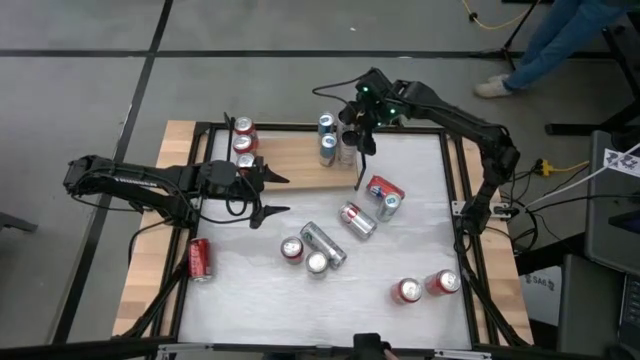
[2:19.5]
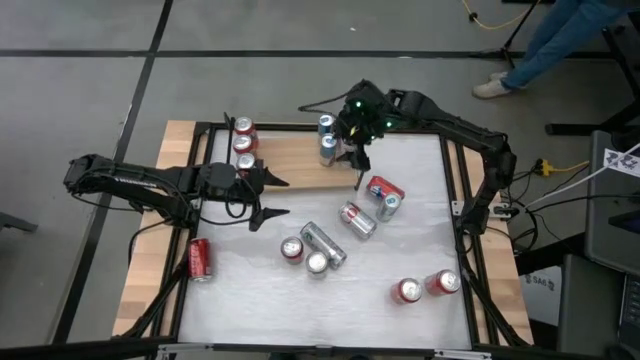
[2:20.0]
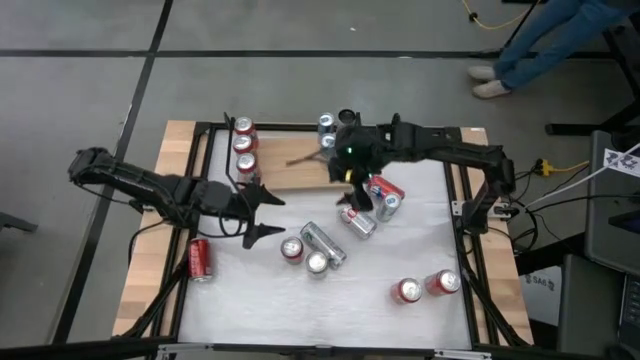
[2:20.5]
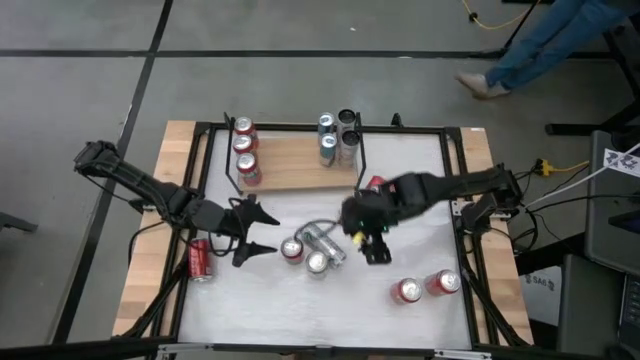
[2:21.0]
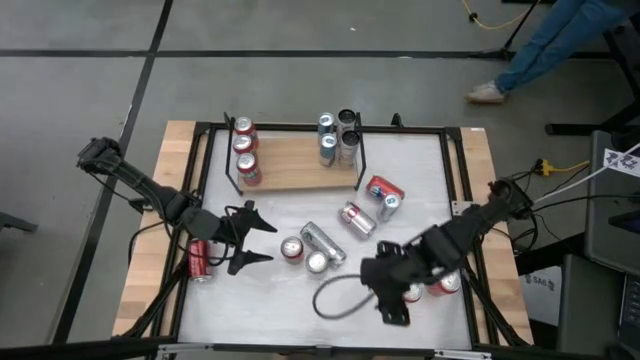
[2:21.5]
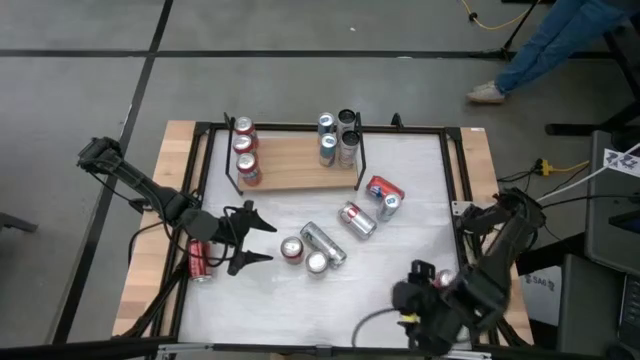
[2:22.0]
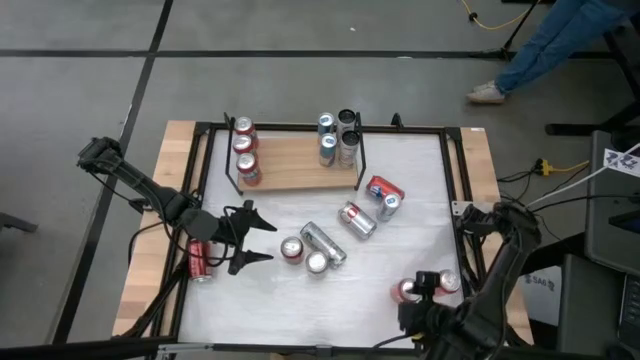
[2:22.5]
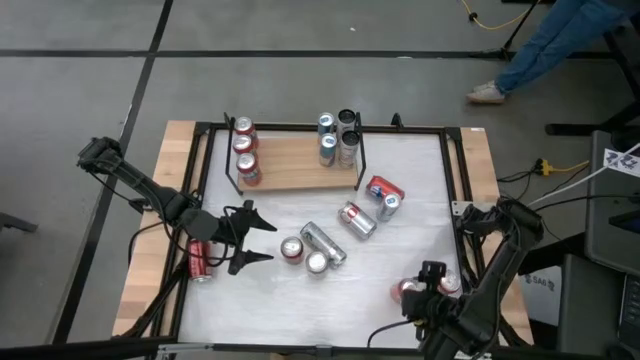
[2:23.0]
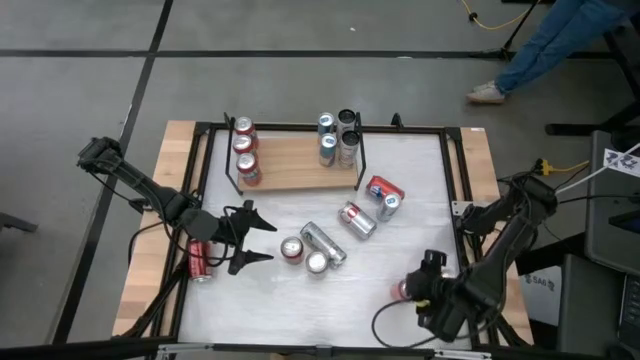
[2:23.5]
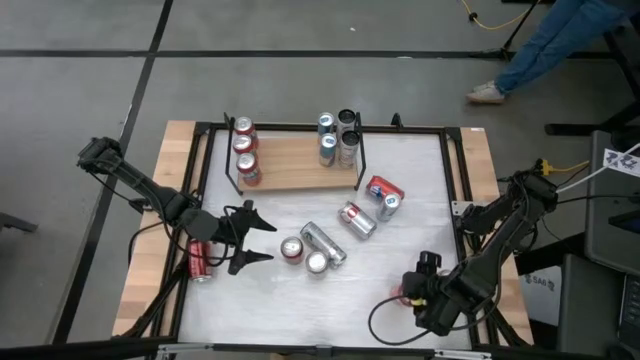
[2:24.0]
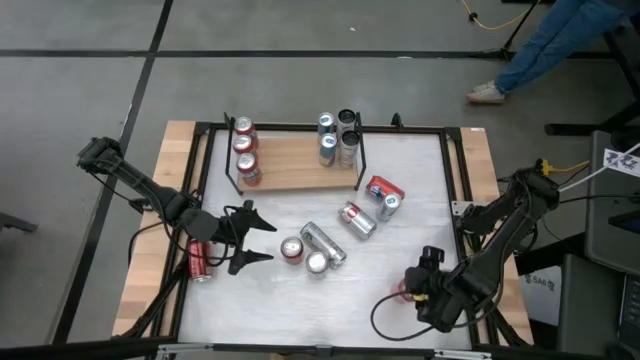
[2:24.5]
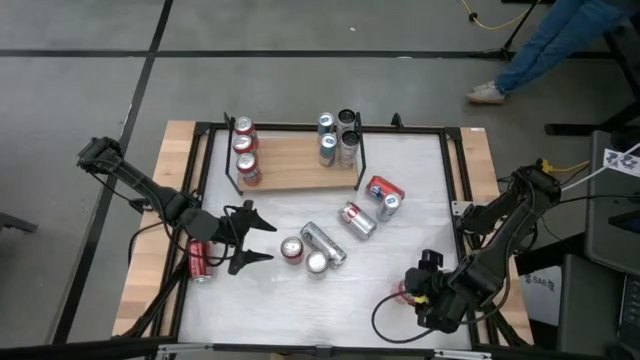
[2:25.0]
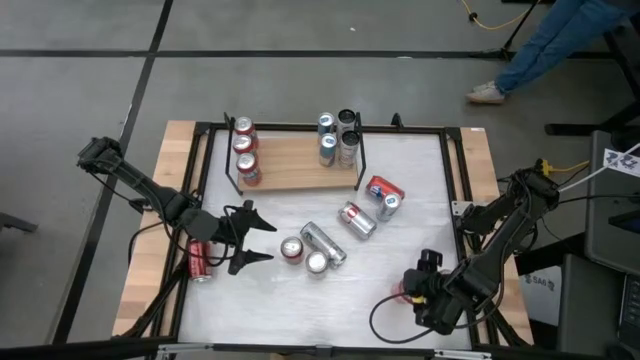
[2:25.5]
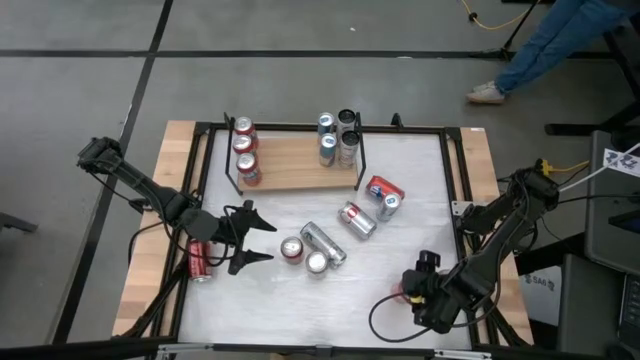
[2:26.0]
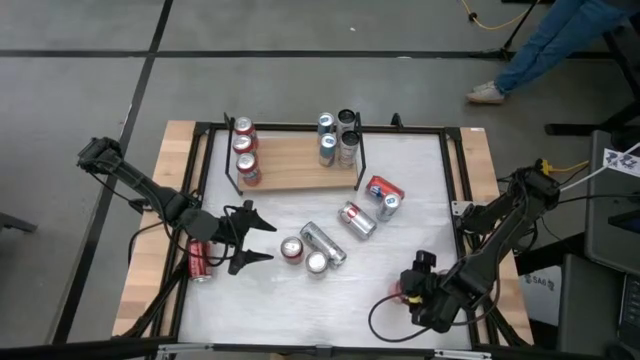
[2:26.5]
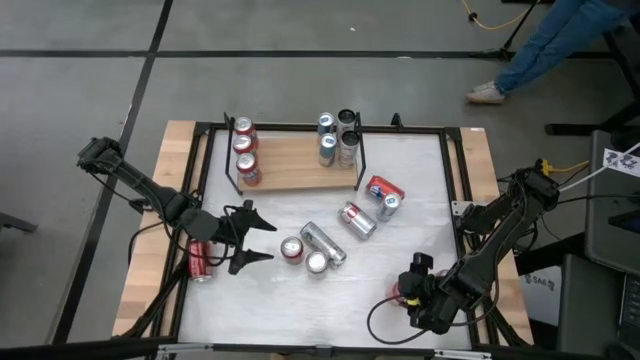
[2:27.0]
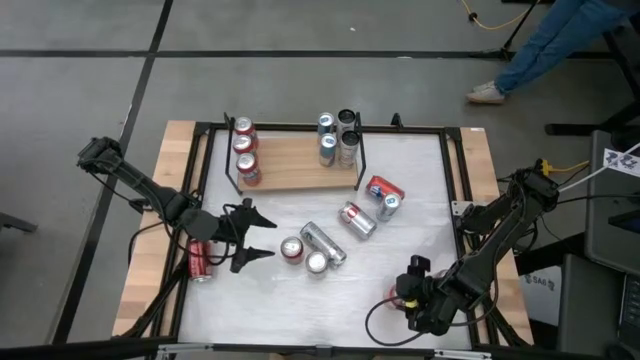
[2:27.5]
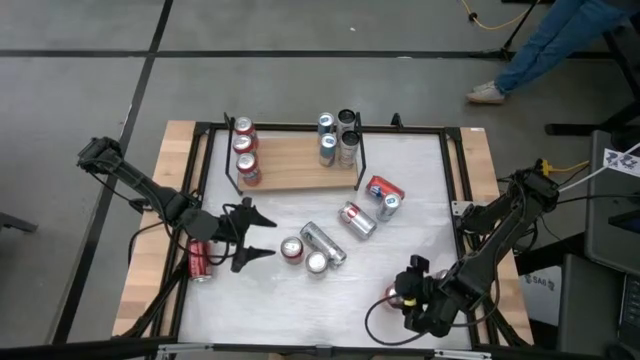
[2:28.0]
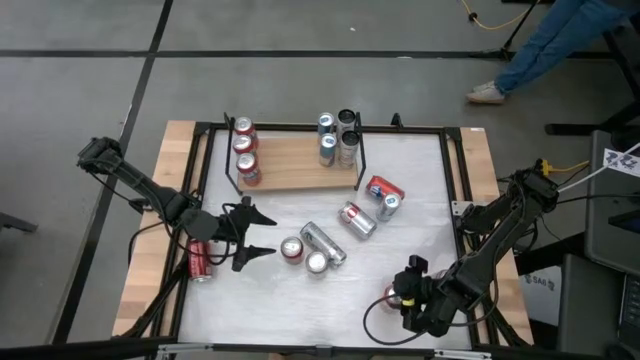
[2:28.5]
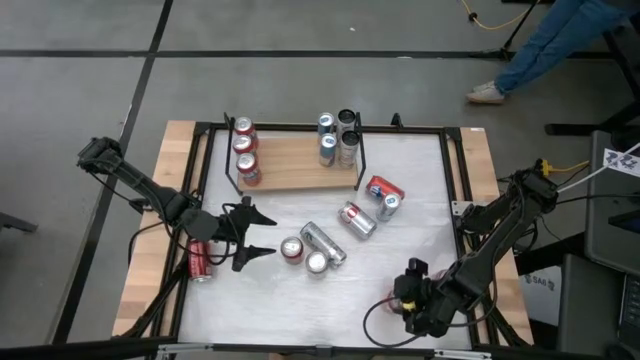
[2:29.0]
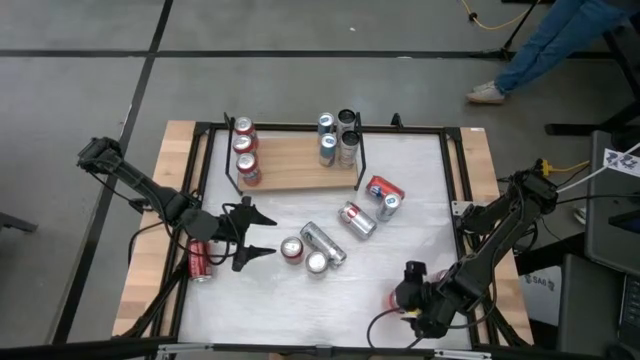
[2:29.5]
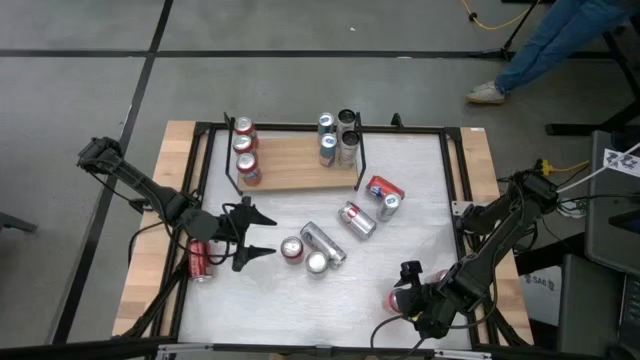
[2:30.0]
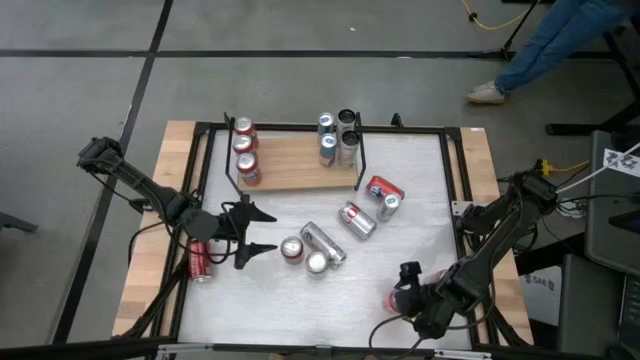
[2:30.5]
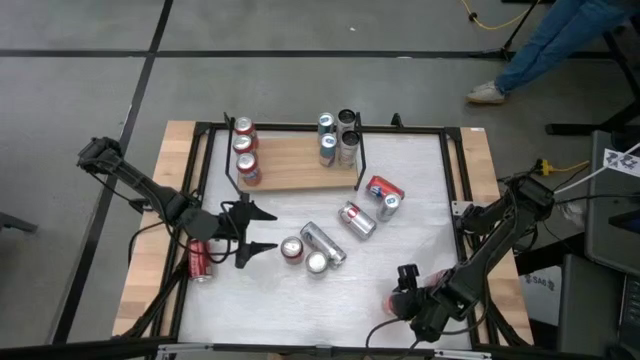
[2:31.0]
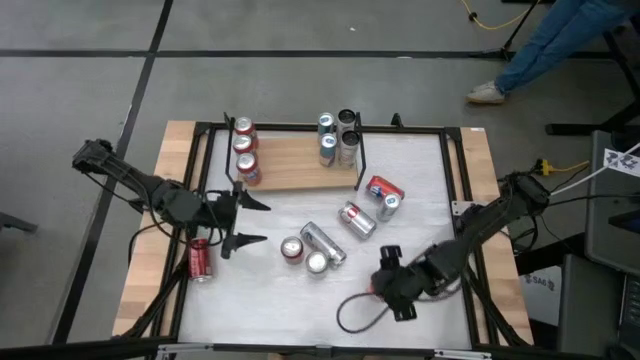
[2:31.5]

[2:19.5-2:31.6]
Task: Place canned beverage on shelf
Put the red soda can on the shelf

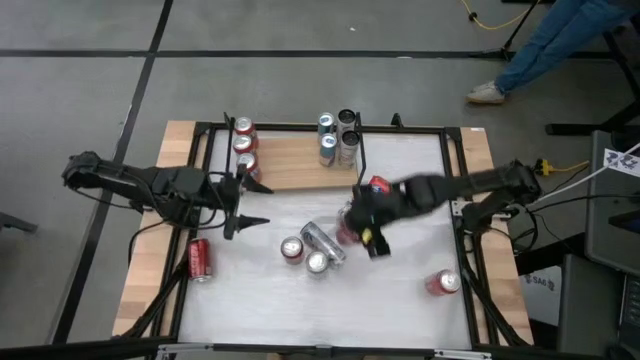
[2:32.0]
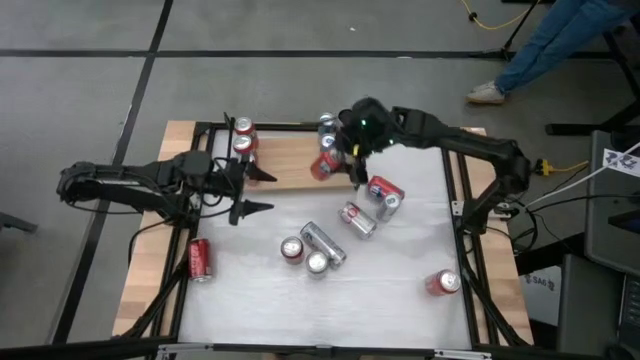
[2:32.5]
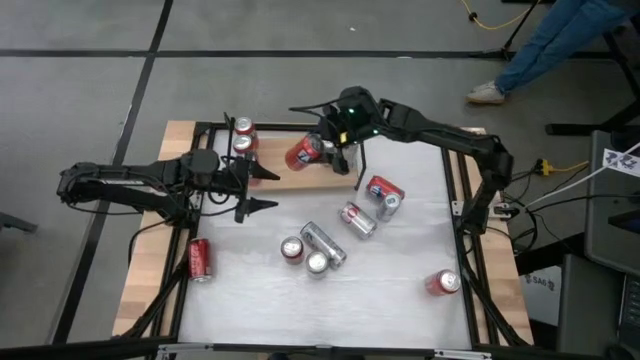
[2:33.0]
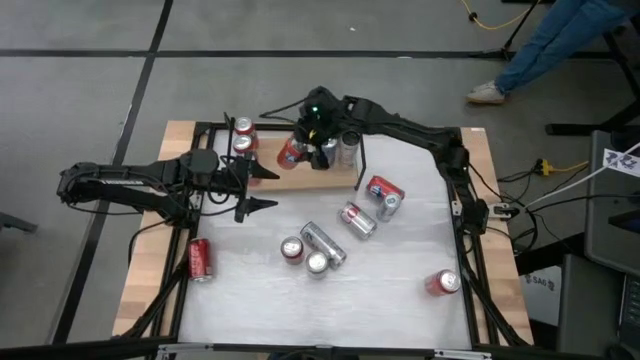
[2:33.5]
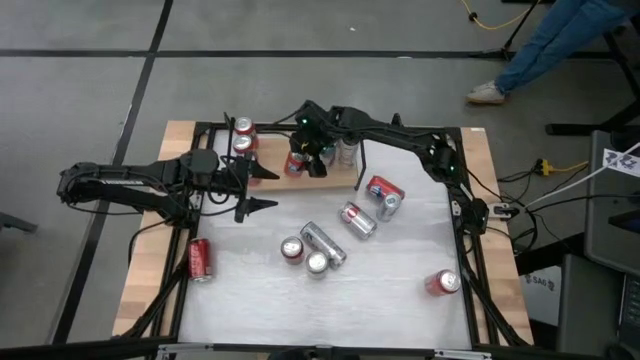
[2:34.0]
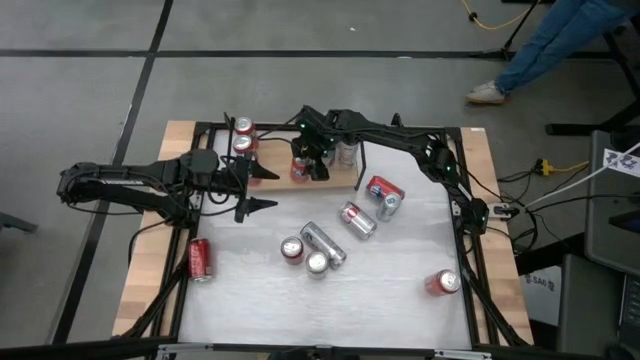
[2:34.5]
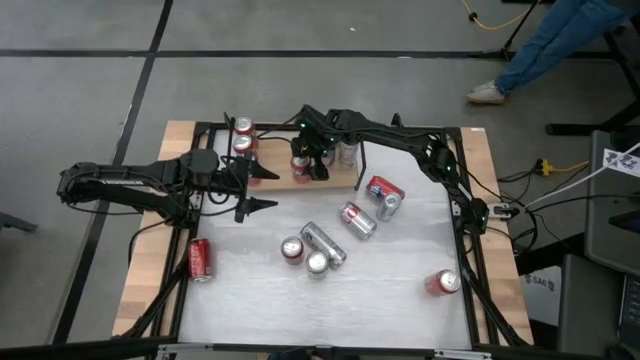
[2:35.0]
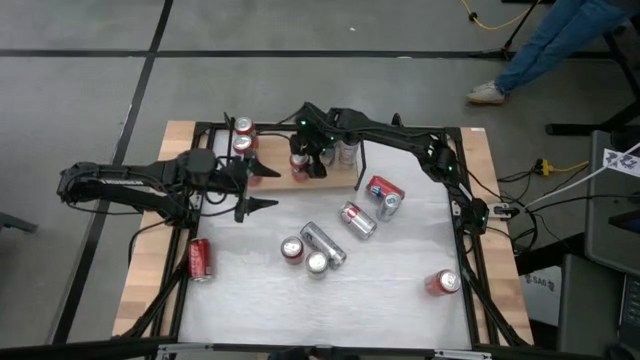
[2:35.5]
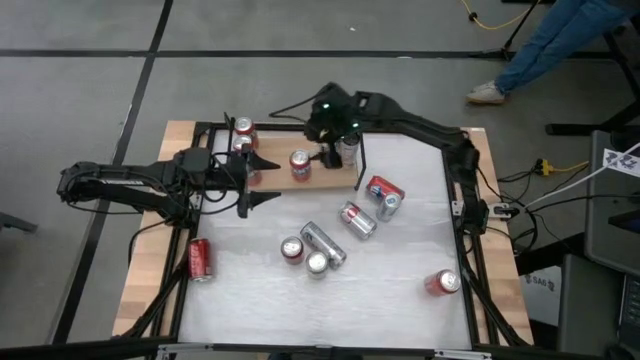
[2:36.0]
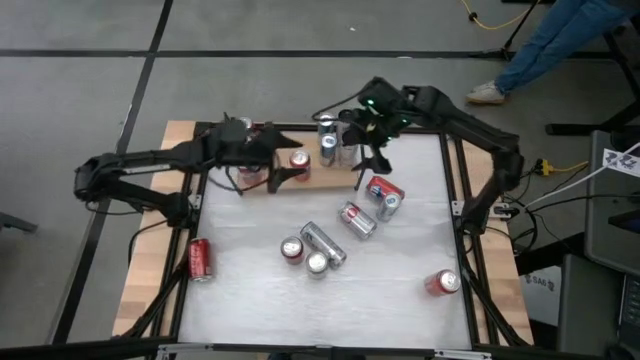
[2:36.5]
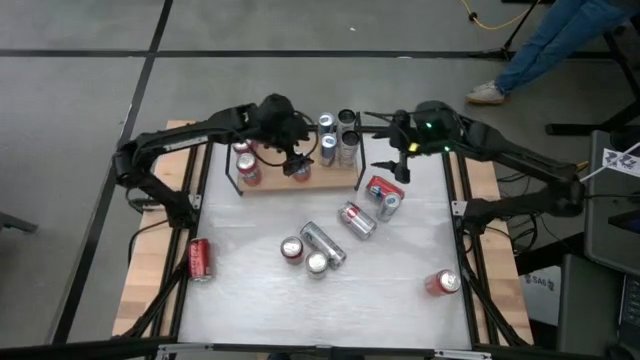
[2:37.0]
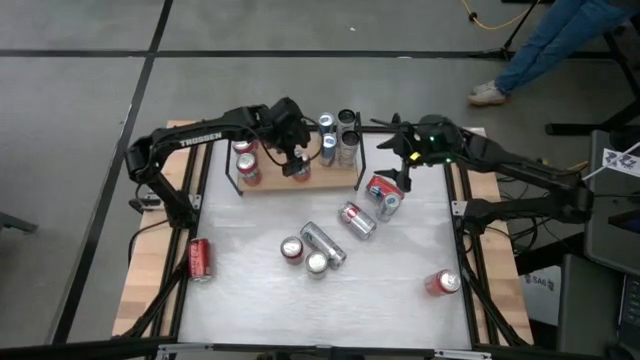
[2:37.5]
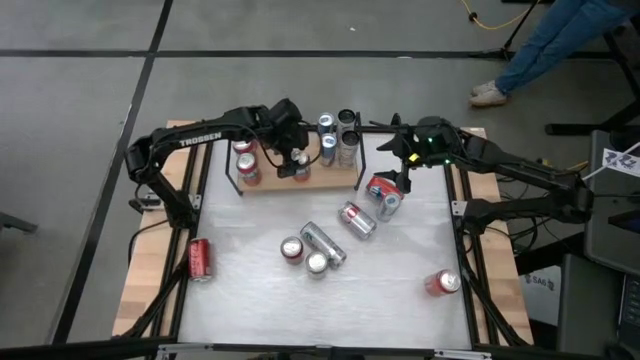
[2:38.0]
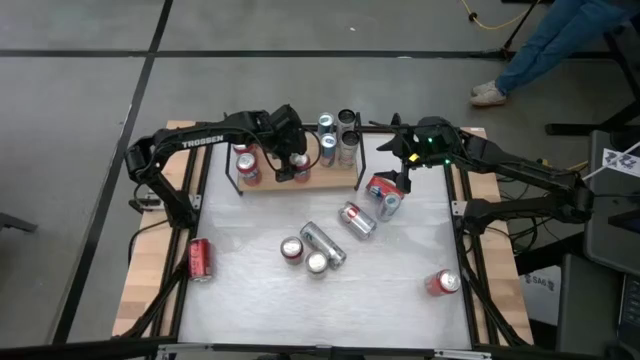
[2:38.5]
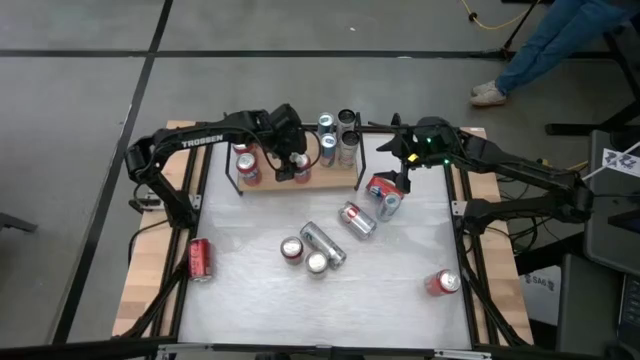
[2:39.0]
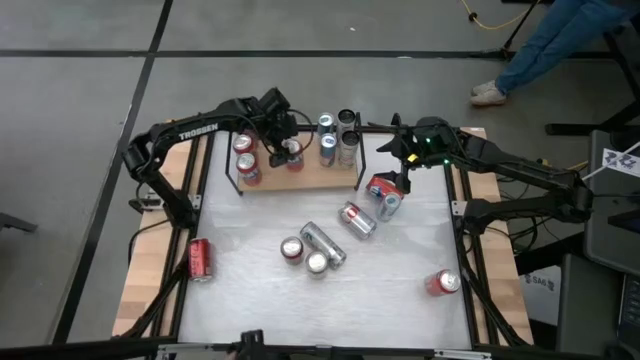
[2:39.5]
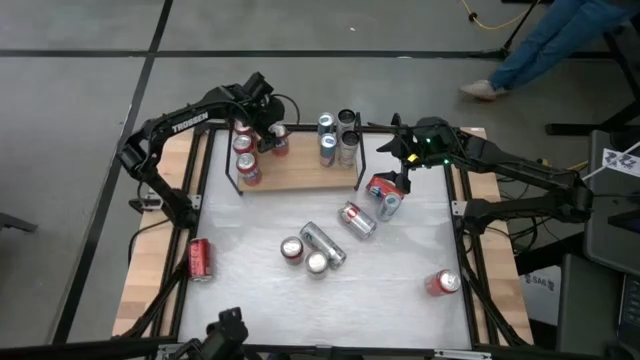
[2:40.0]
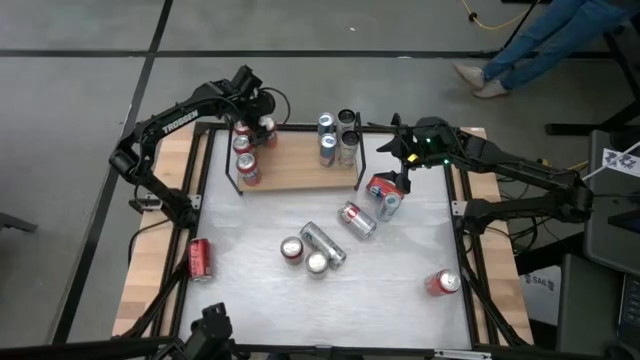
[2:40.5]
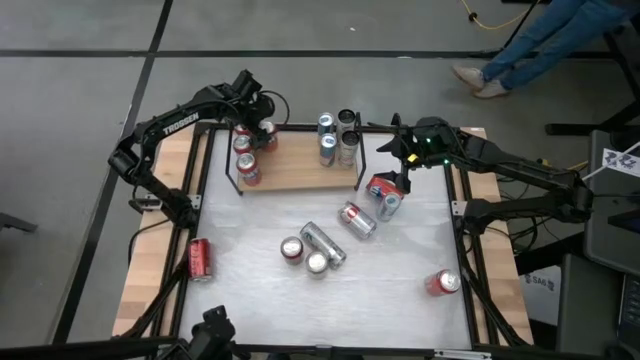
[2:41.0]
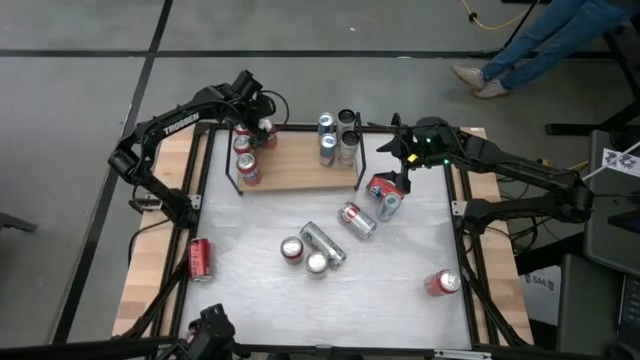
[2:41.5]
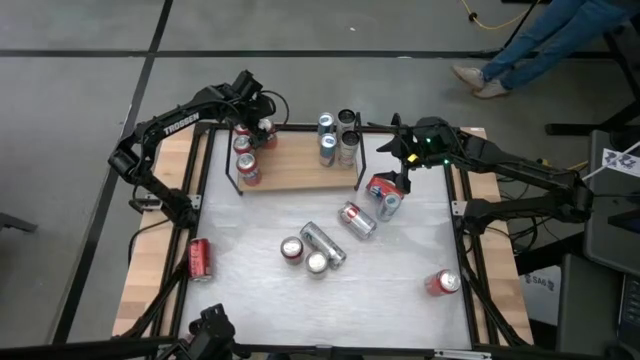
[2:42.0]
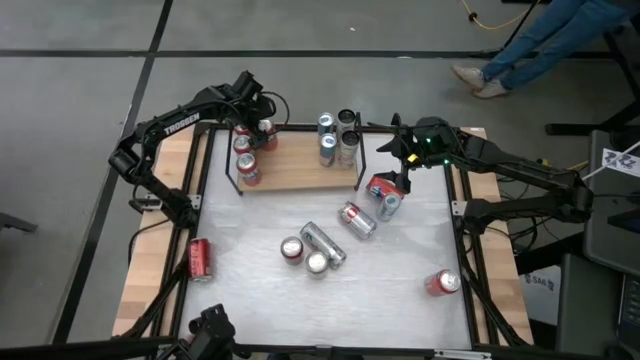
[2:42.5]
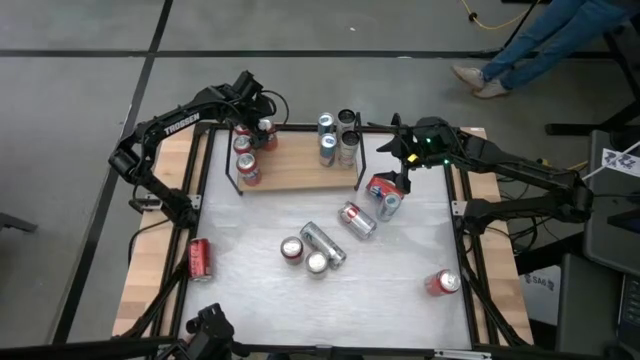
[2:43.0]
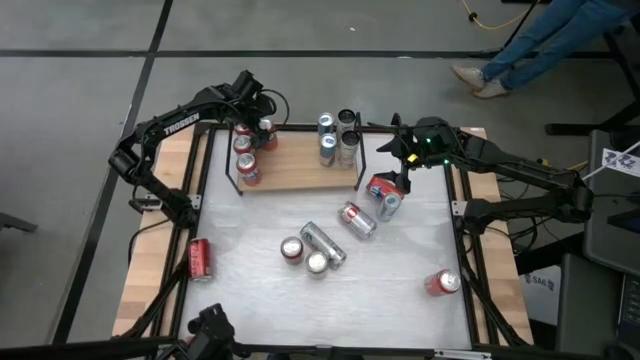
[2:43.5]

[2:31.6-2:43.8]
Put the red soda can on the shelf
